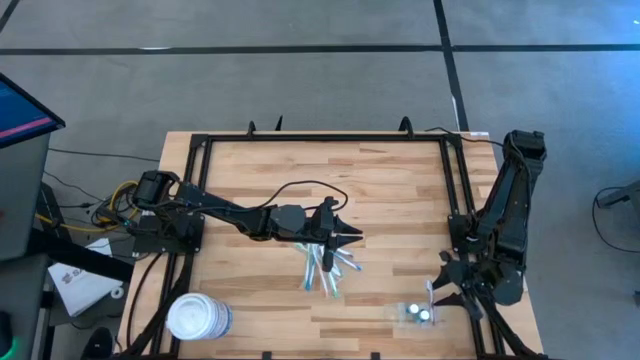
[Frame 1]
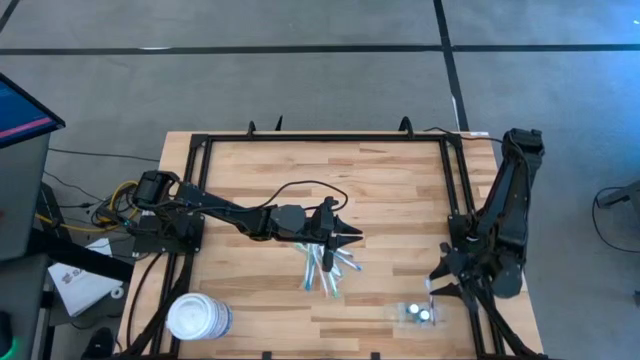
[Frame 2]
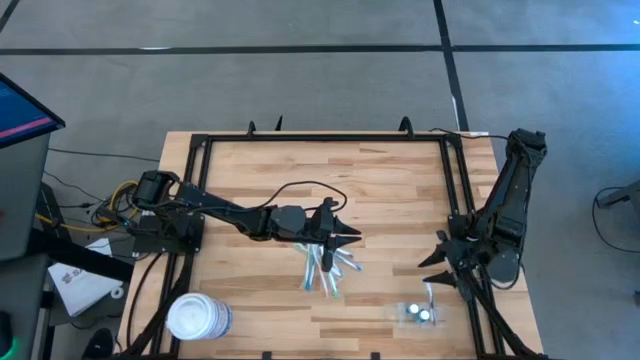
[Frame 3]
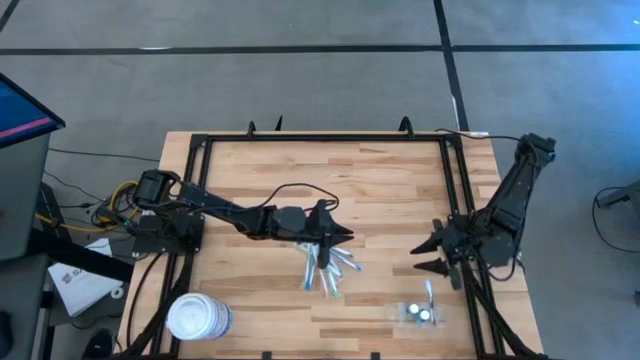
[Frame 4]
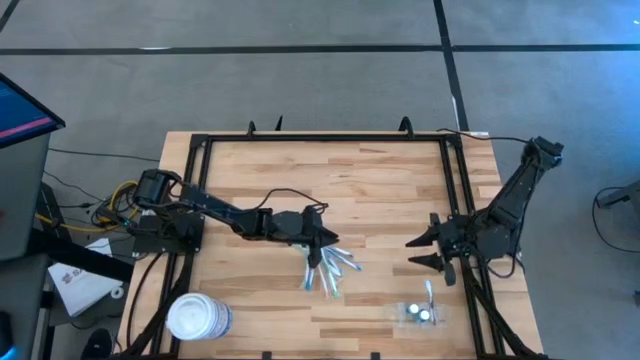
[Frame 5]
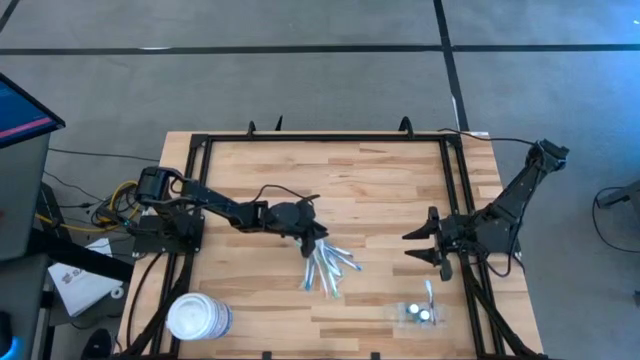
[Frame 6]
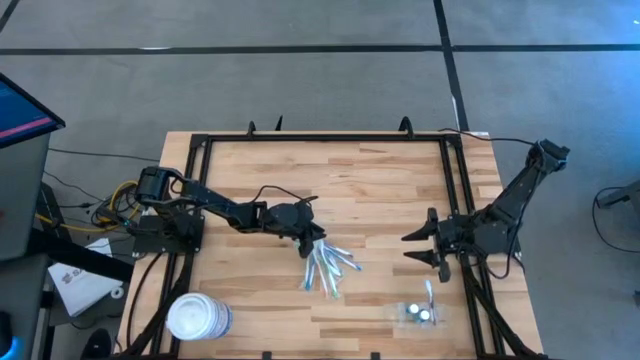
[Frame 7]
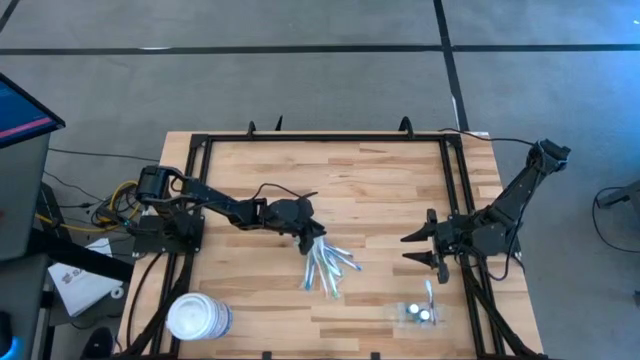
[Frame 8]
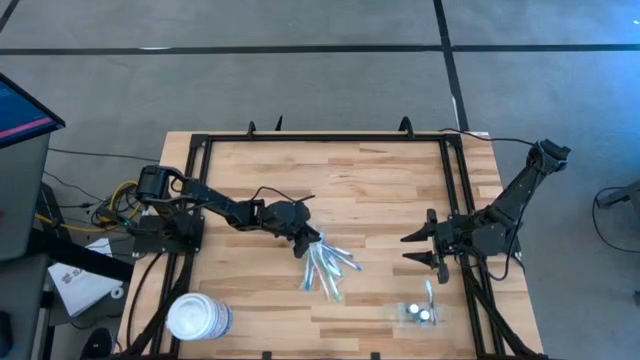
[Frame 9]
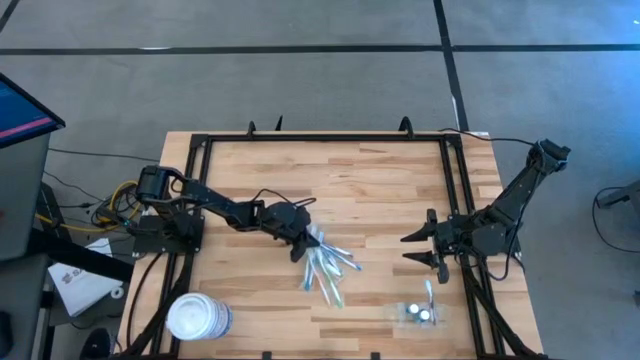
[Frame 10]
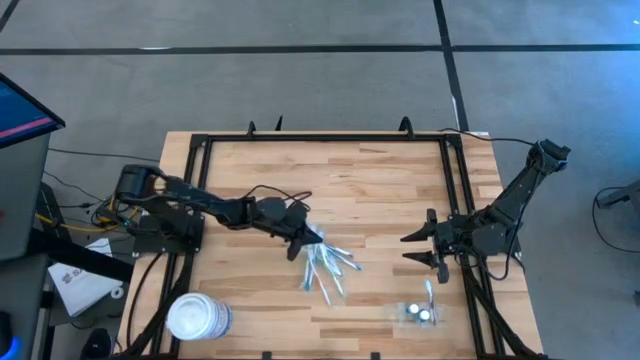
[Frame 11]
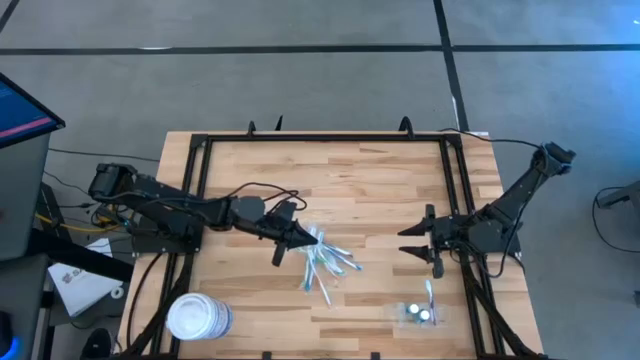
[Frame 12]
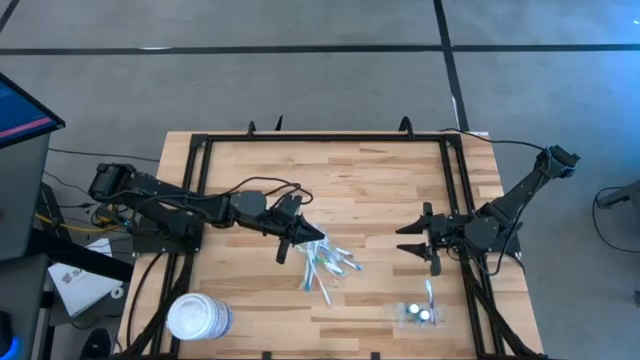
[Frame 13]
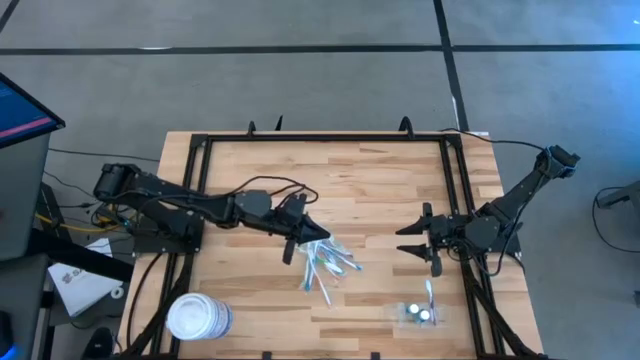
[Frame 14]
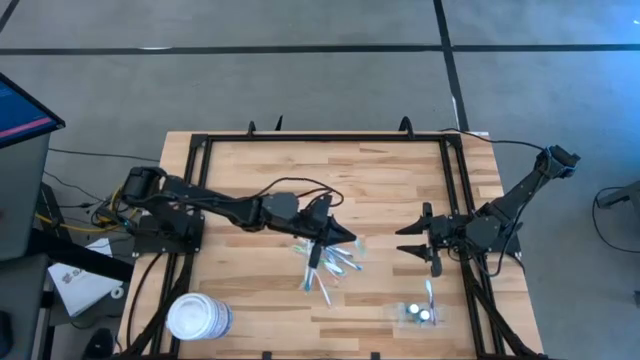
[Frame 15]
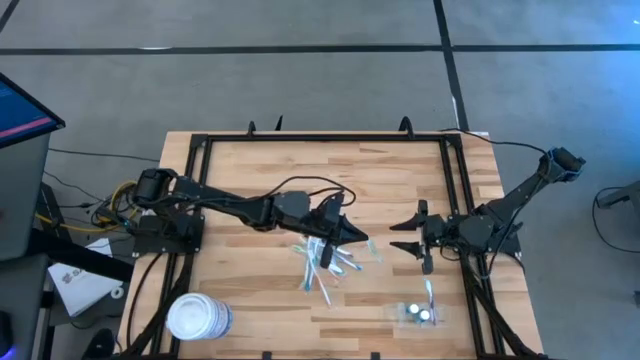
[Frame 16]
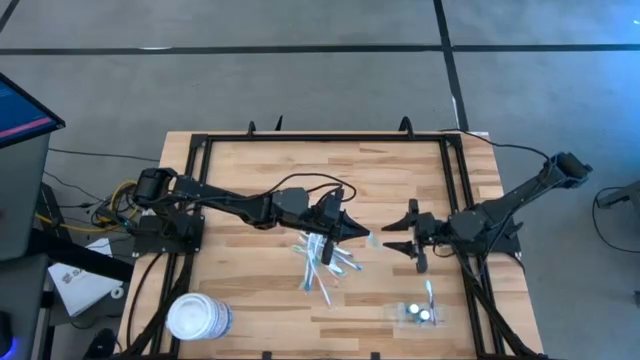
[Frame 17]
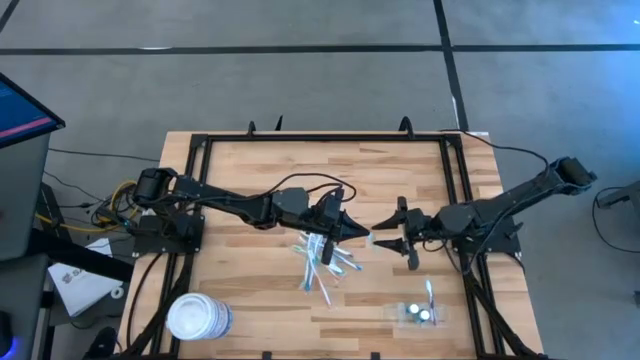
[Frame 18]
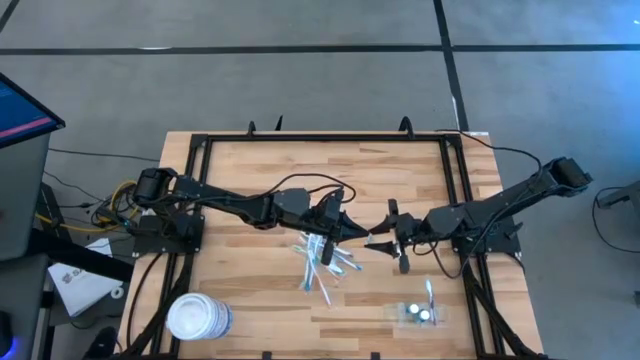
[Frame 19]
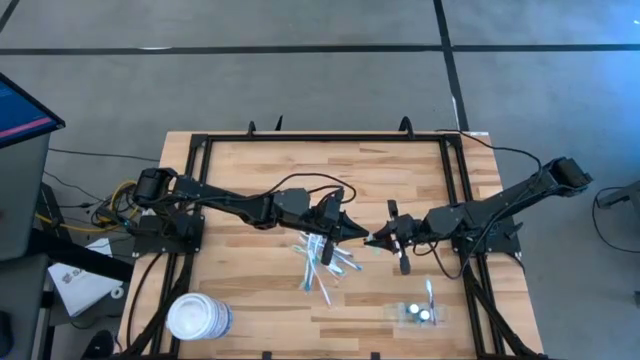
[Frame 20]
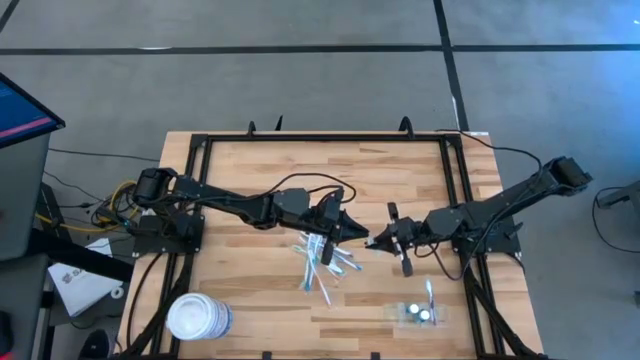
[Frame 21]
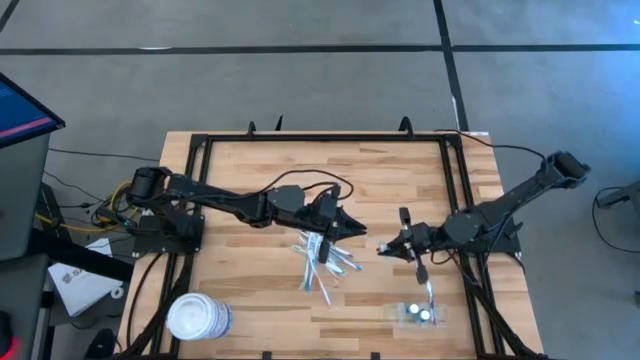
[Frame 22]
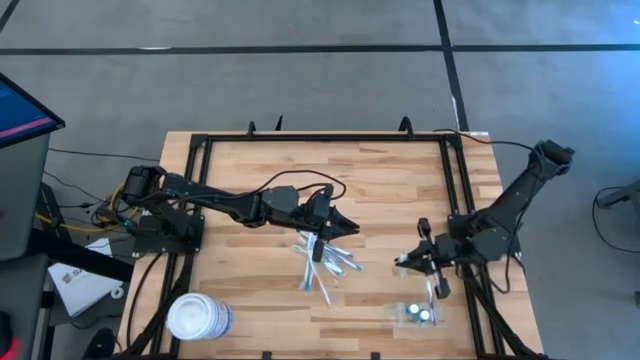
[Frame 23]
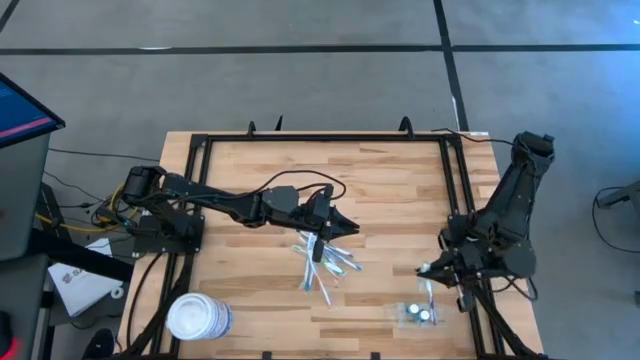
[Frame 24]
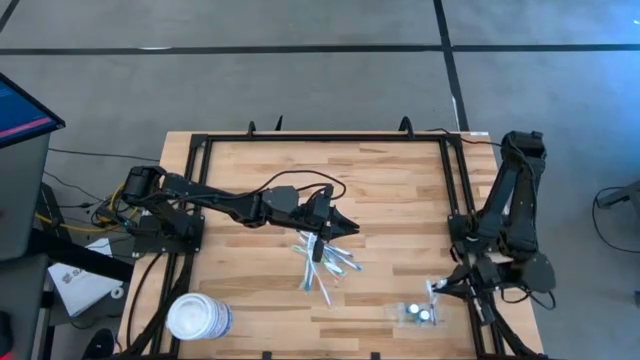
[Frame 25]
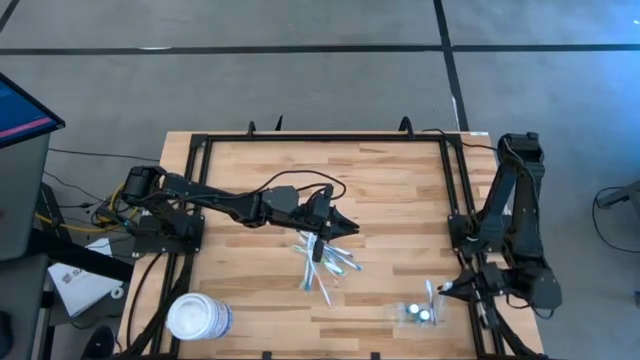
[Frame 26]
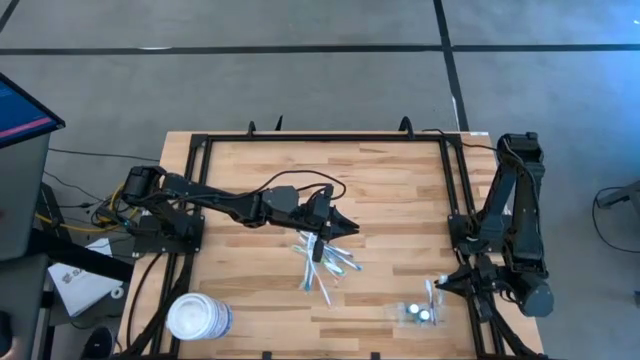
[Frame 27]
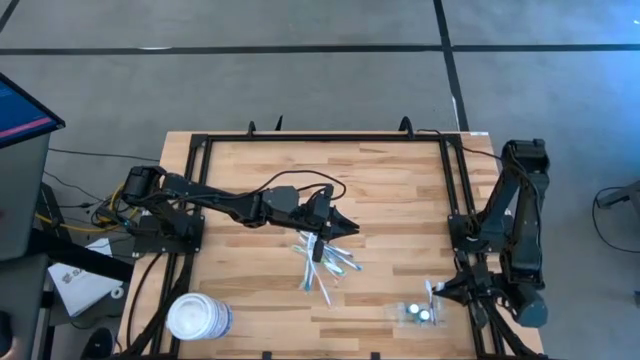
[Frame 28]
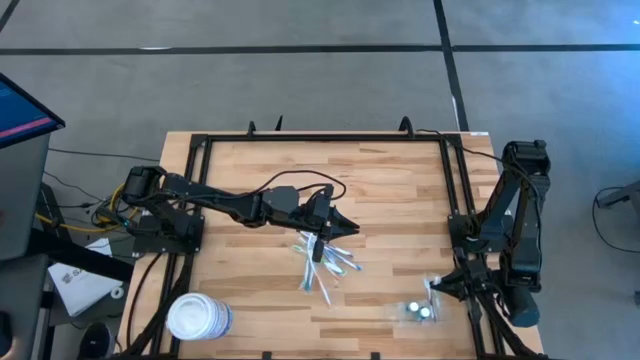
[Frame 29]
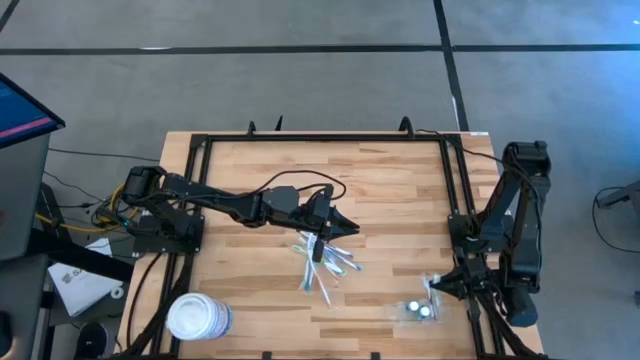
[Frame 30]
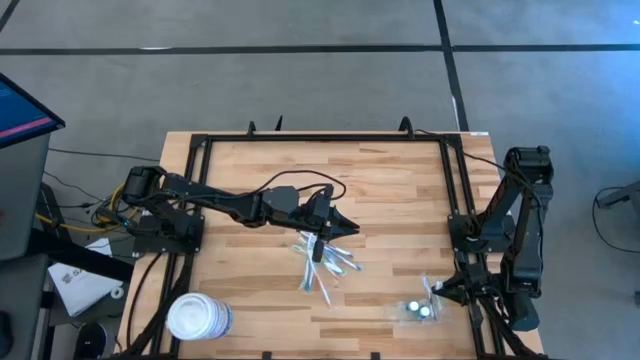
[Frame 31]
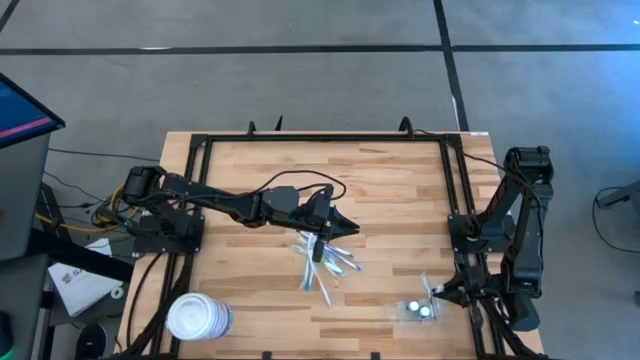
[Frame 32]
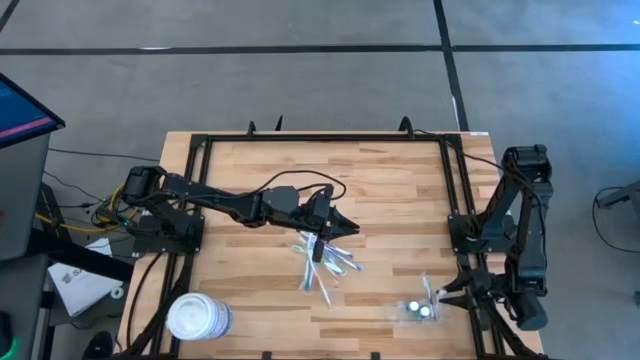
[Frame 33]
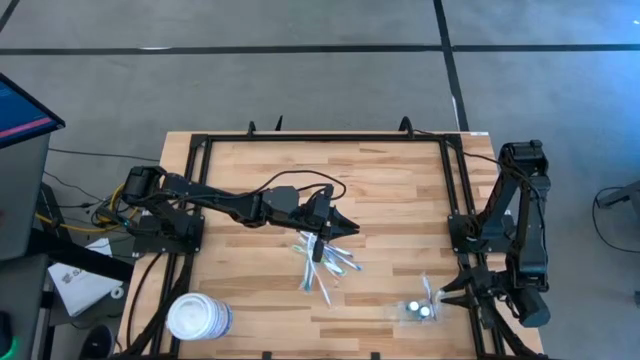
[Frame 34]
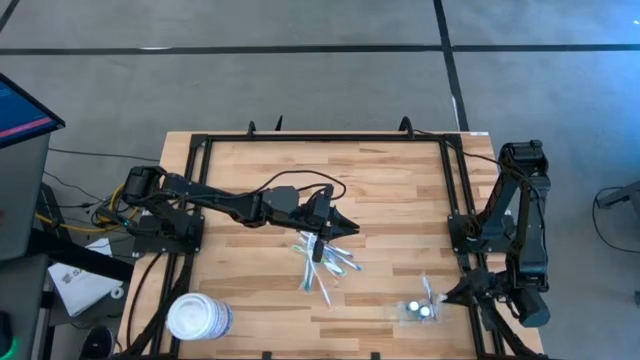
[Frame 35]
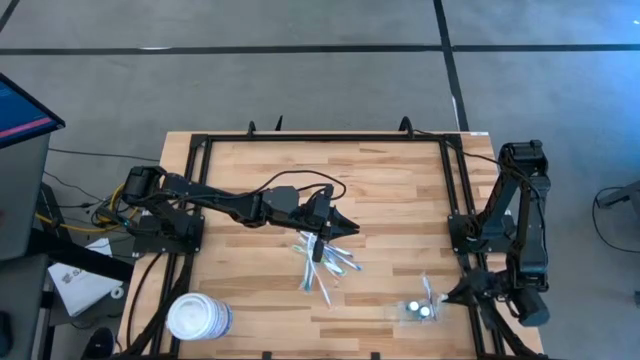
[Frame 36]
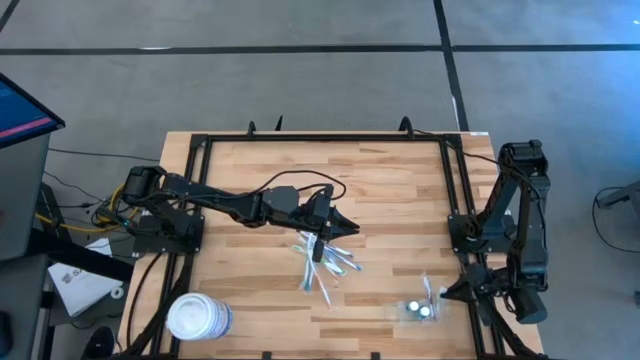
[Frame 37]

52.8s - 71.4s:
Task: Pick & Place toothbrushing station
Put the green toothbrush into the transparent organizer

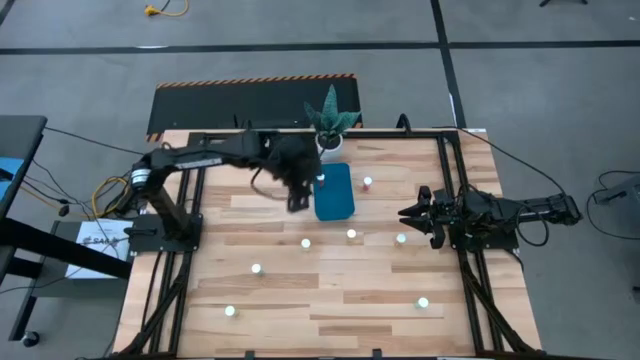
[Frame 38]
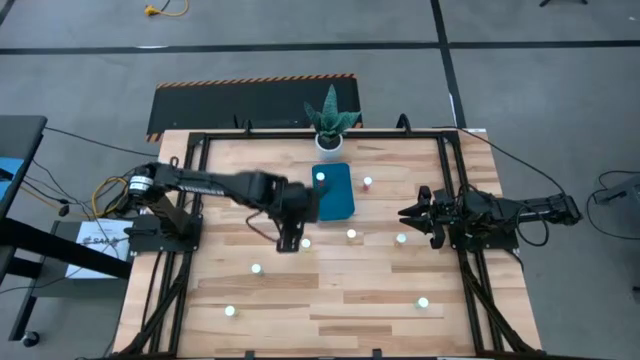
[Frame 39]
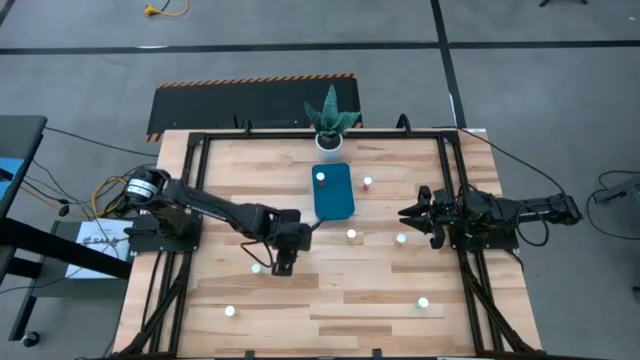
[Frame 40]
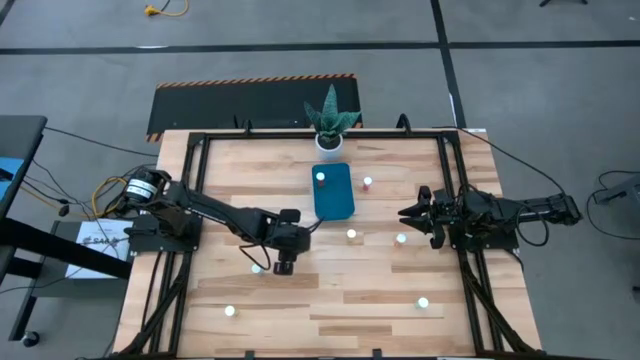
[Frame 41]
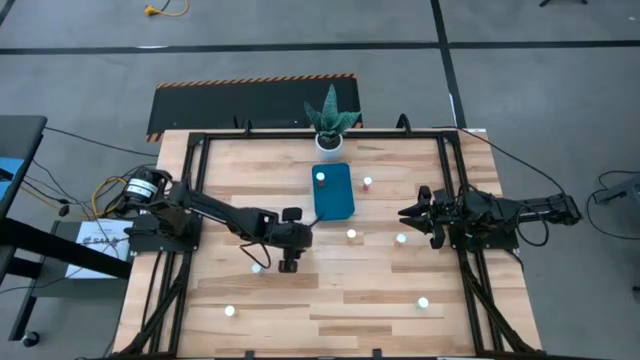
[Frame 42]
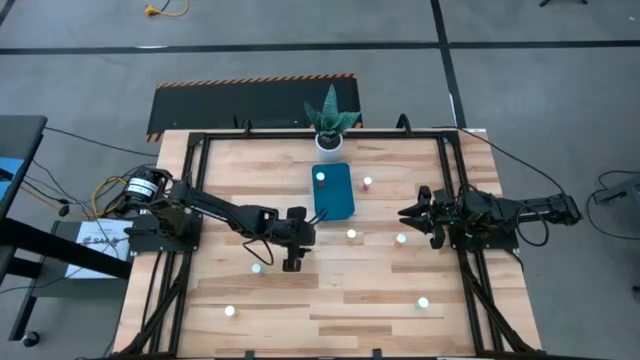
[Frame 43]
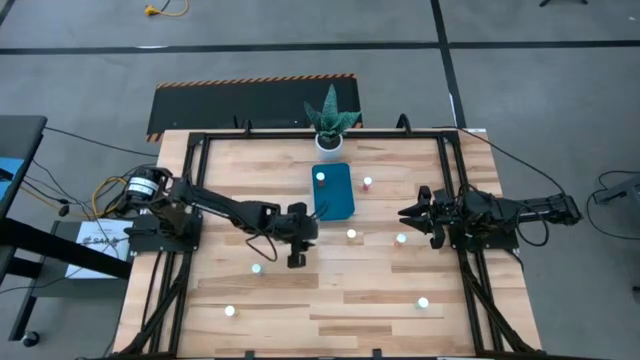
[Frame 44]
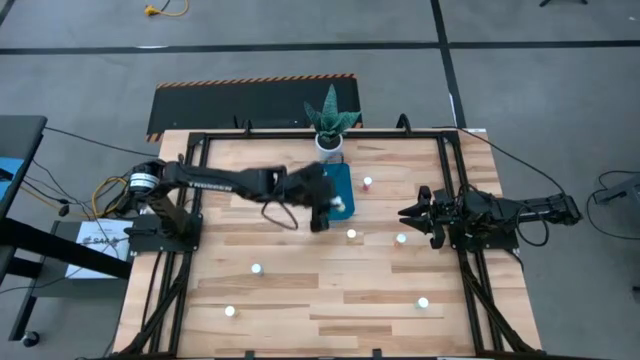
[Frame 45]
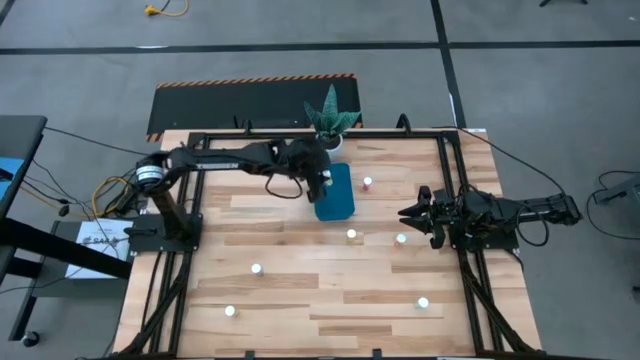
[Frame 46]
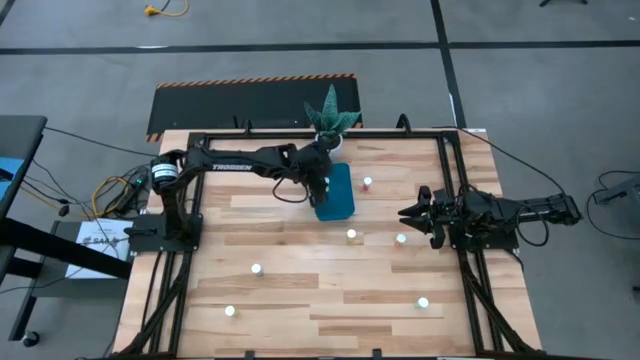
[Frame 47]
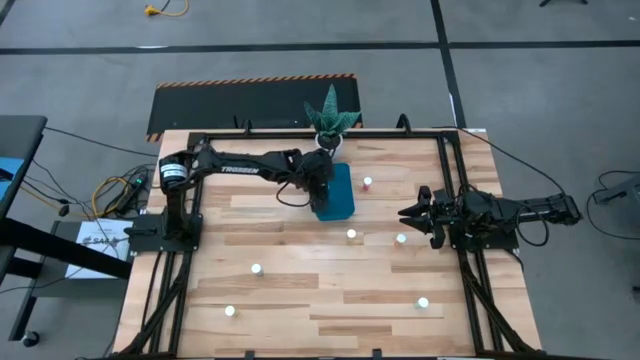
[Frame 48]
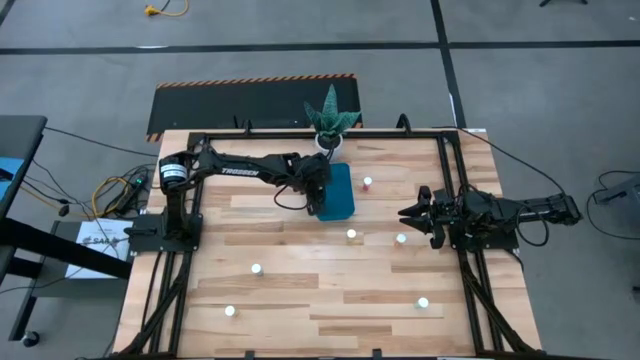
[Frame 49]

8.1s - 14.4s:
Task: Pick and place pill bottles into a basket
Put the yellow pill bottle into the blue container
